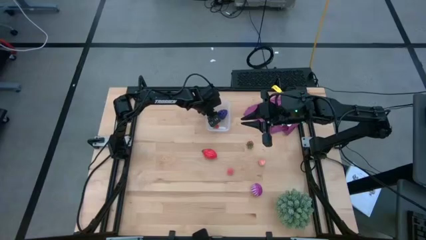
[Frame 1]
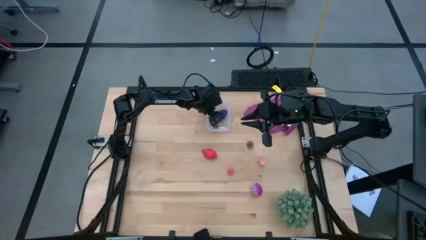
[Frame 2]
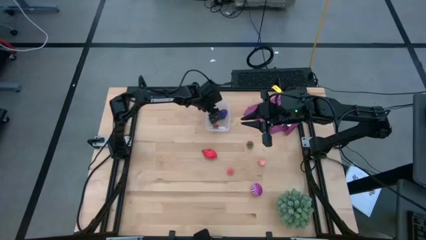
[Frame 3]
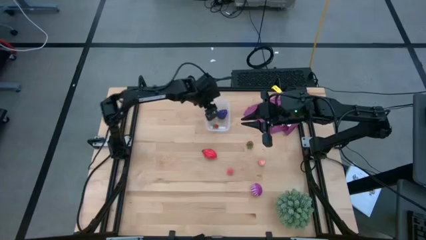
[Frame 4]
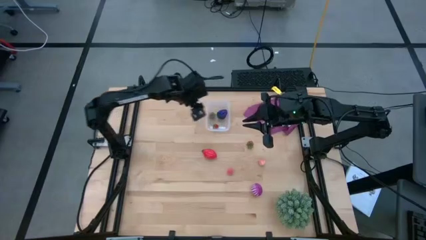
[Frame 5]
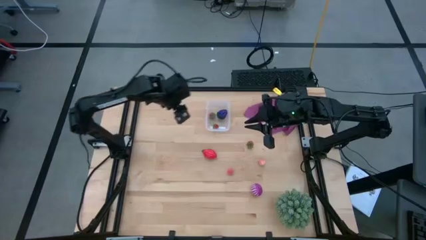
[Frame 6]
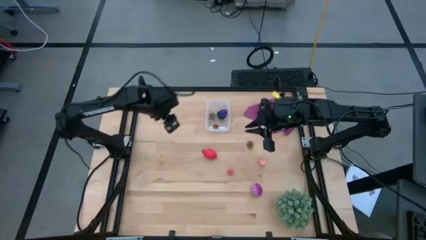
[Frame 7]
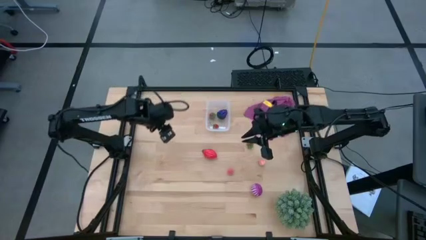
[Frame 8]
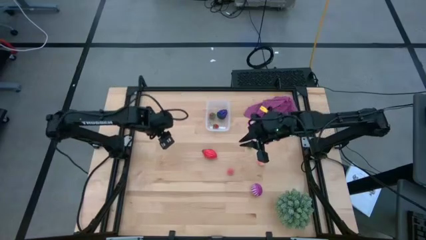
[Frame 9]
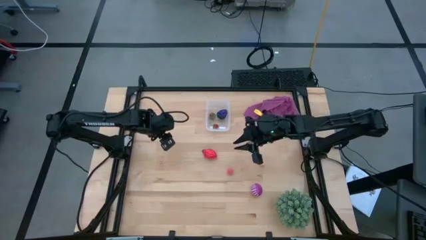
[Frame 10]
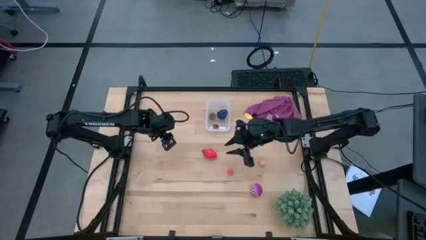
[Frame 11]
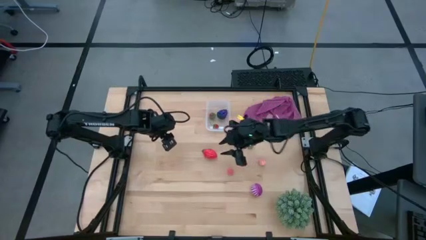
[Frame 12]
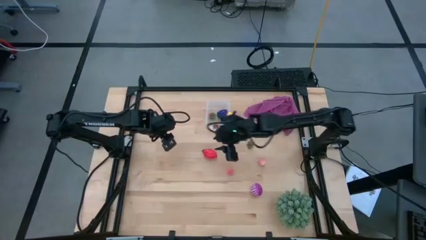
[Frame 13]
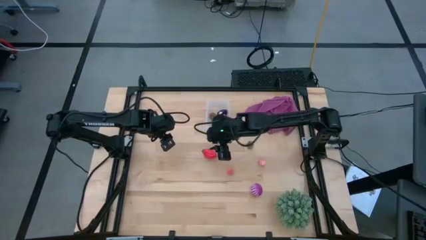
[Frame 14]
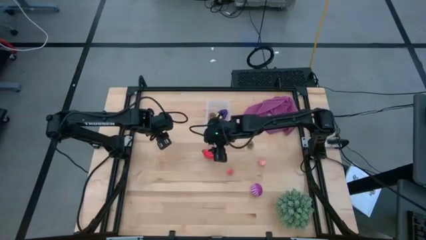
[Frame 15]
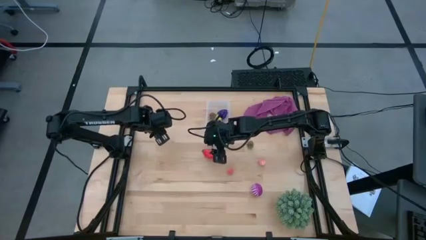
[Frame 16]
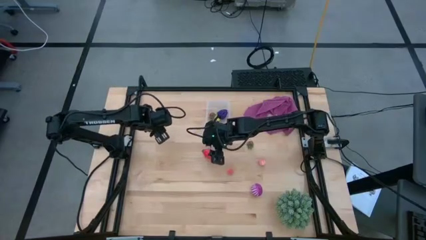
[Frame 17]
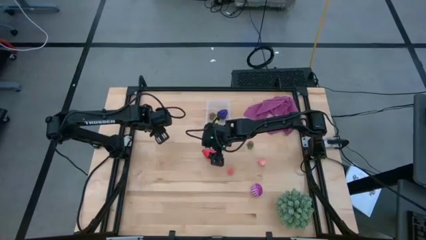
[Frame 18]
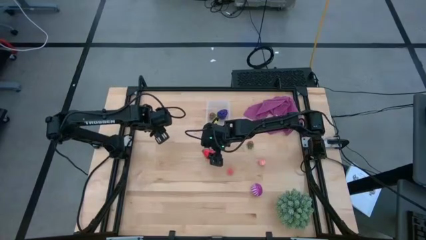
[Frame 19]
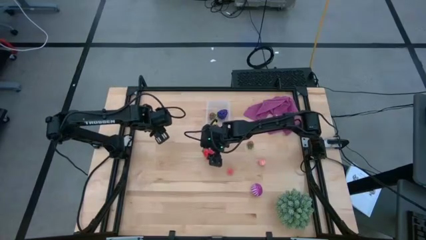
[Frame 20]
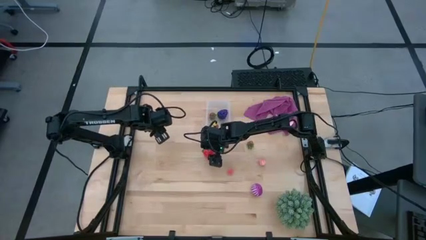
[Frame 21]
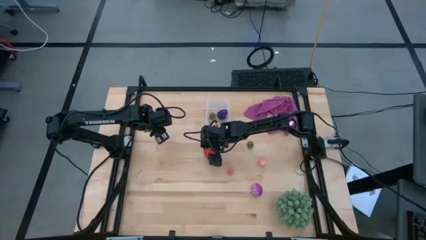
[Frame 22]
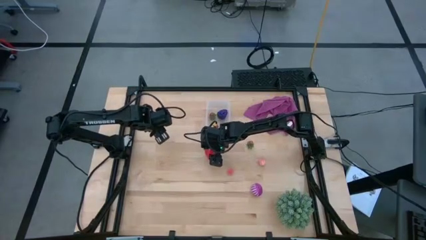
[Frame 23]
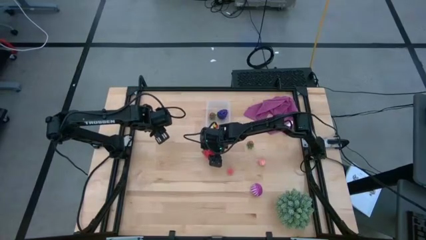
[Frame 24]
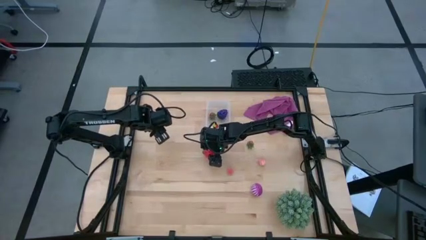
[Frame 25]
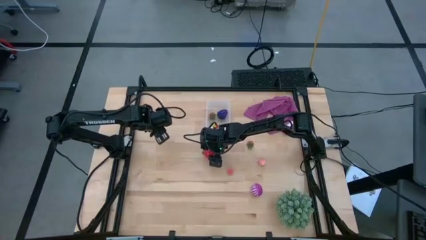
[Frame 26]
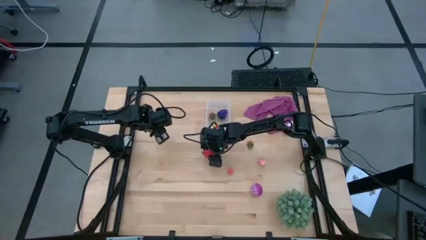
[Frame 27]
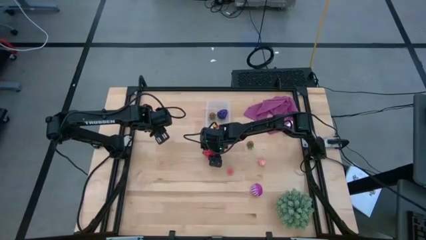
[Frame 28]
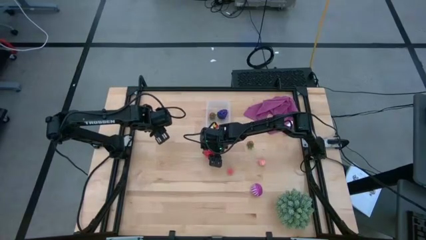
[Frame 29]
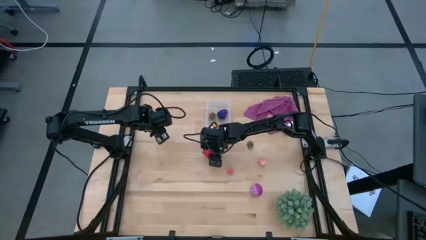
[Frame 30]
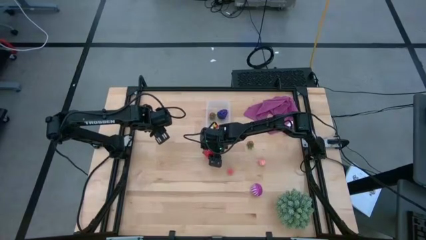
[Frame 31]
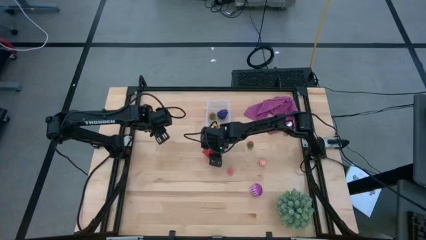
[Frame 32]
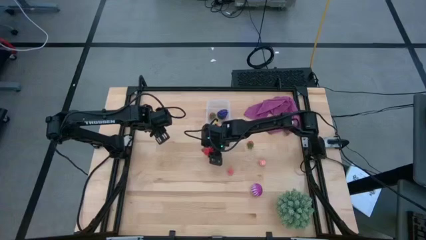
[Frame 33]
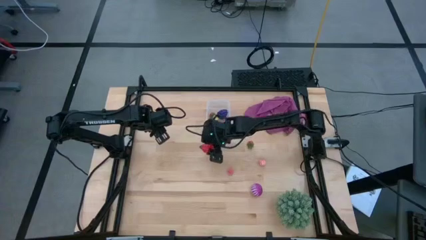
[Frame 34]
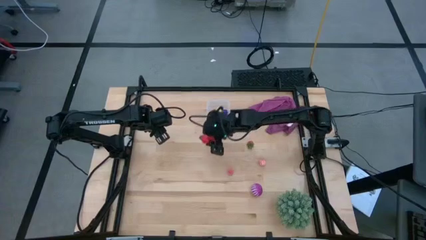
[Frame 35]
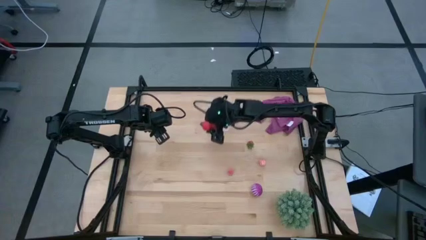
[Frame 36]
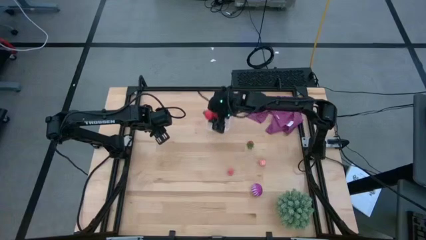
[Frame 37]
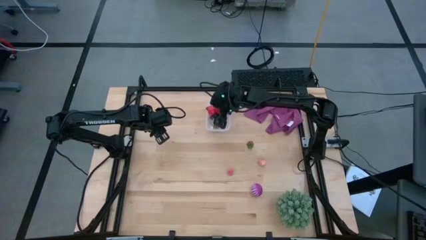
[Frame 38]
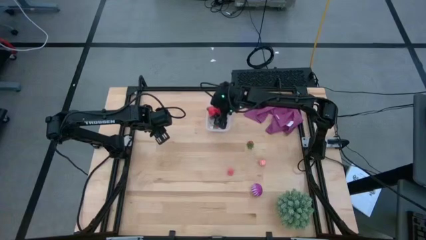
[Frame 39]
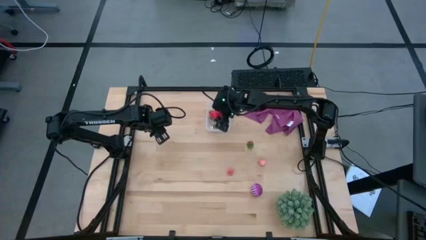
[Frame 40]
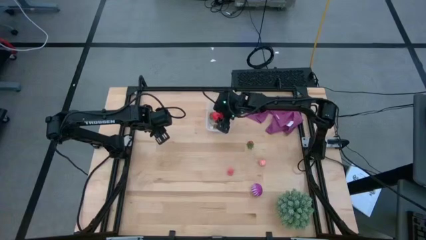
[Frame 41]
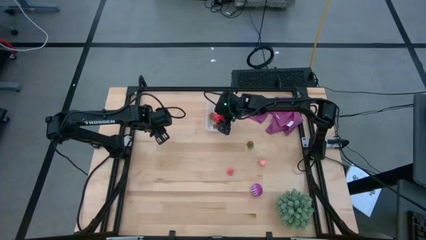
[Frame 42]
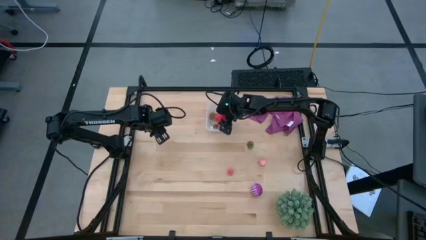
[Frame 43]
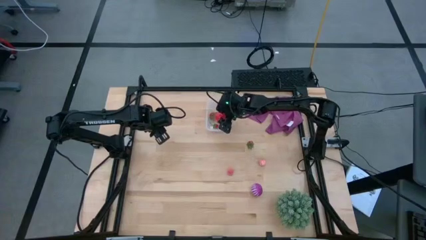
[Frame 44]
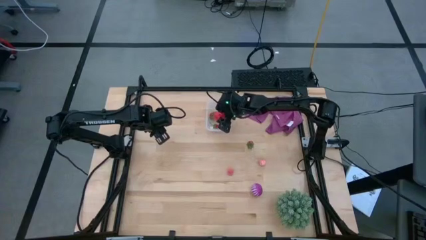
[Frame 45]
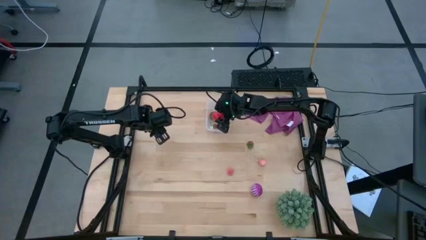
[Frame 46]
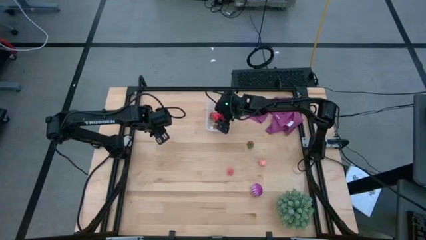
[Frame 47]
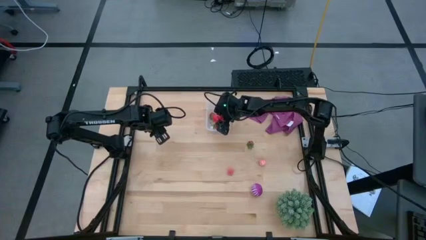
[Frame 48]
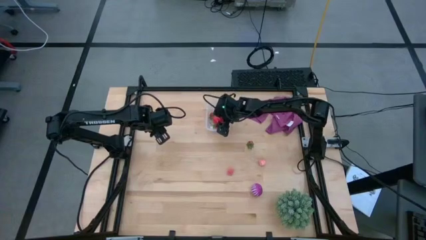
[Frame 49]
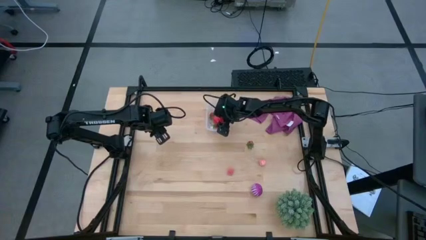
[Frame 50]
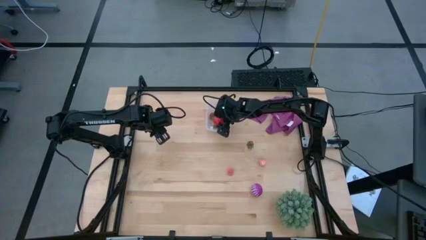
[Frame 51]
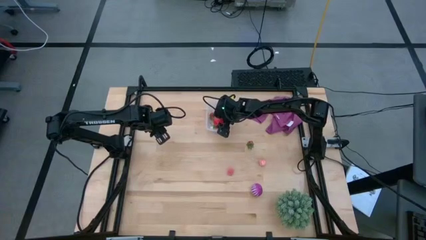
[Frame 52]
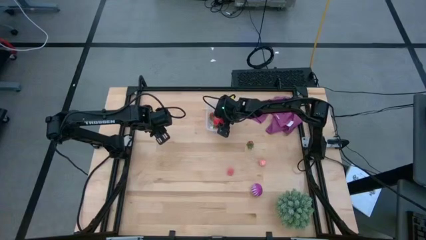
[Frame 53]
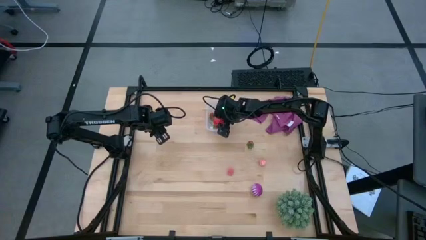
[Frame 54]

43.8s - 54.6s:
Task: Pick and placing Produce into tupperware
Put the red dragon fruit into the transparent bin

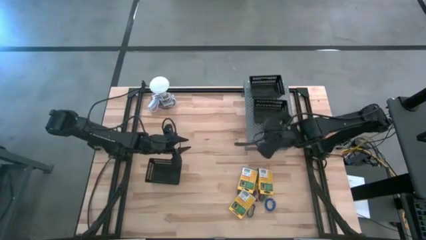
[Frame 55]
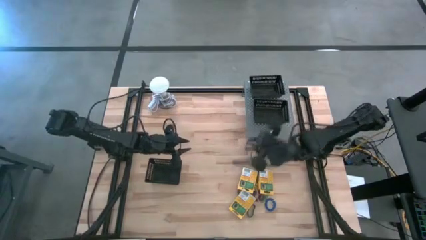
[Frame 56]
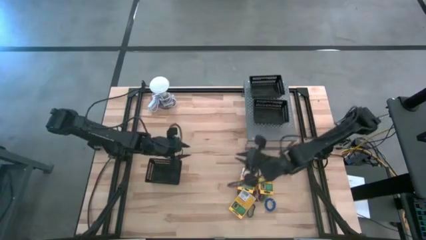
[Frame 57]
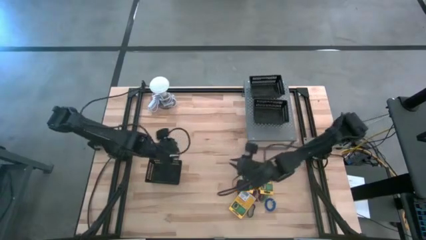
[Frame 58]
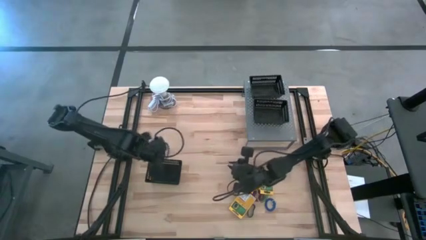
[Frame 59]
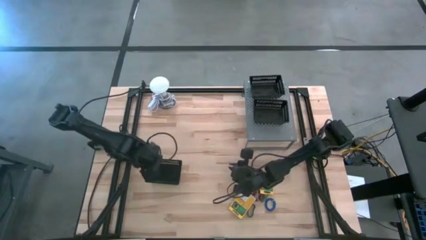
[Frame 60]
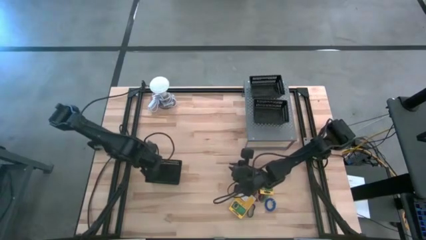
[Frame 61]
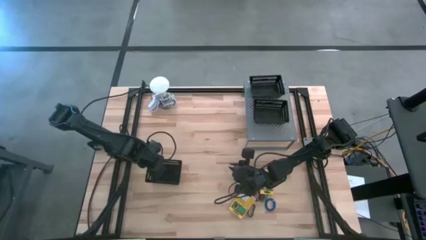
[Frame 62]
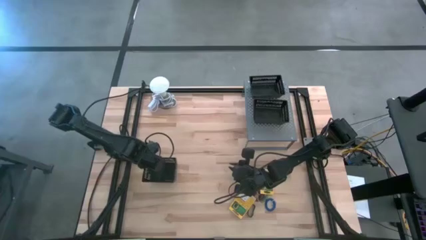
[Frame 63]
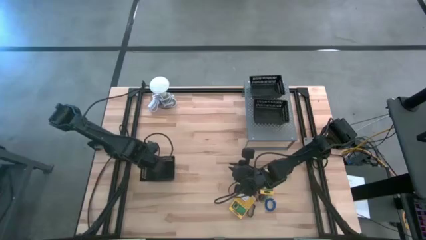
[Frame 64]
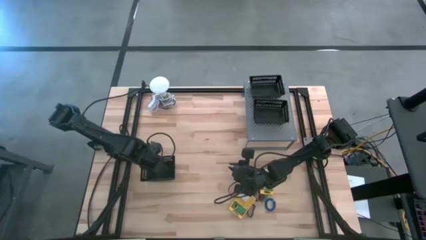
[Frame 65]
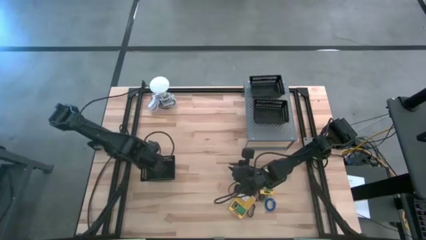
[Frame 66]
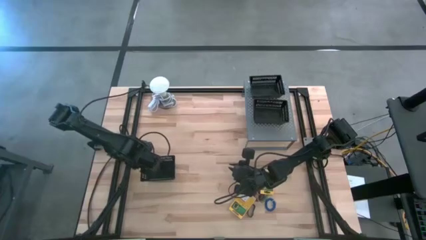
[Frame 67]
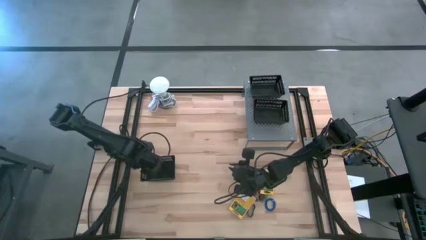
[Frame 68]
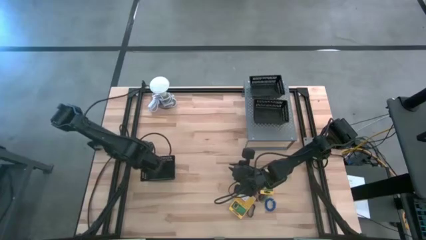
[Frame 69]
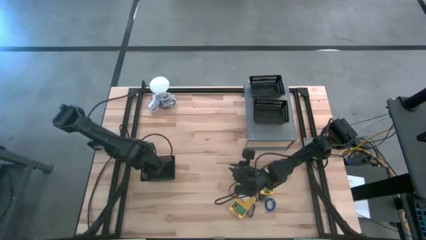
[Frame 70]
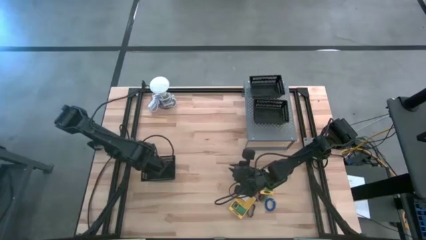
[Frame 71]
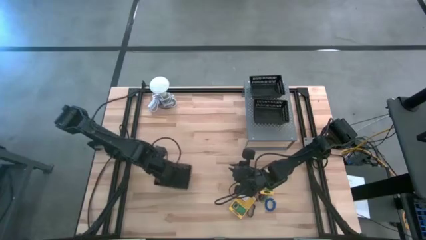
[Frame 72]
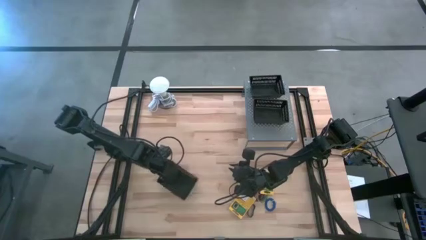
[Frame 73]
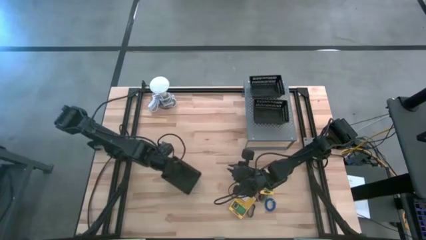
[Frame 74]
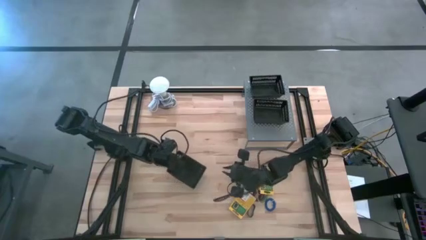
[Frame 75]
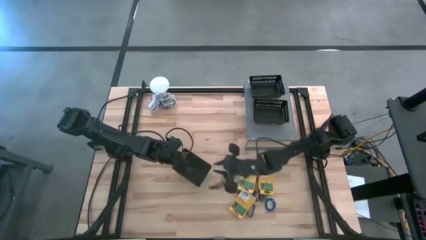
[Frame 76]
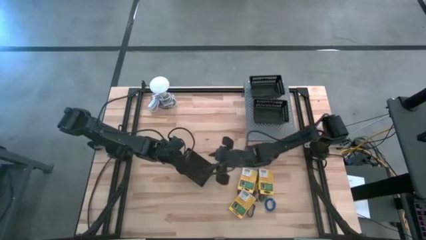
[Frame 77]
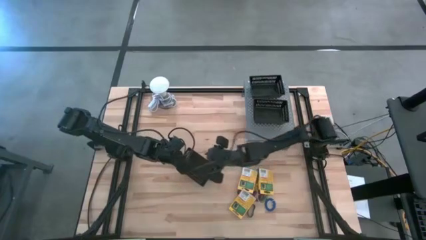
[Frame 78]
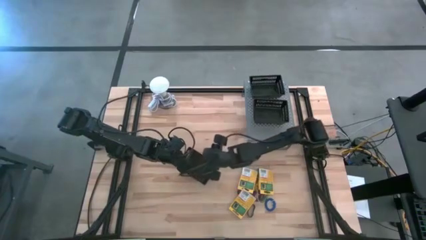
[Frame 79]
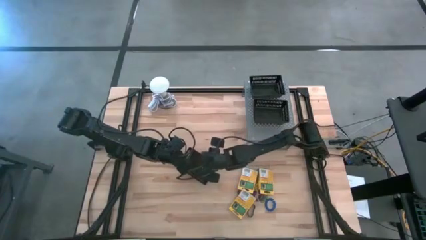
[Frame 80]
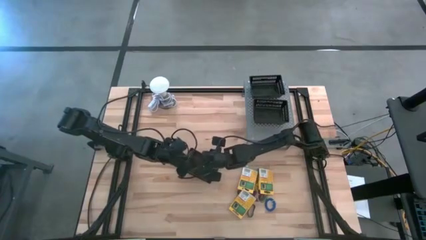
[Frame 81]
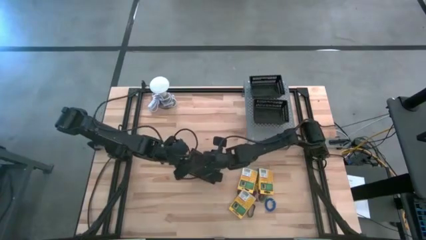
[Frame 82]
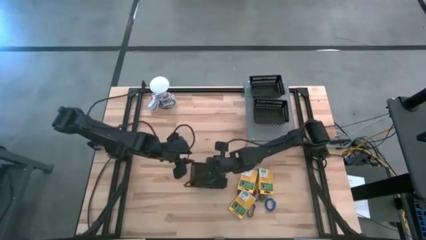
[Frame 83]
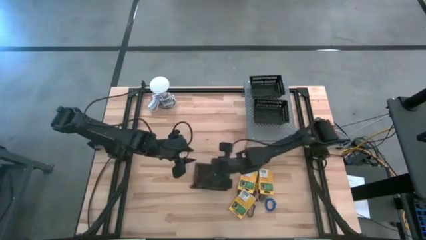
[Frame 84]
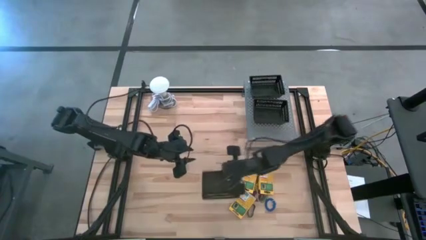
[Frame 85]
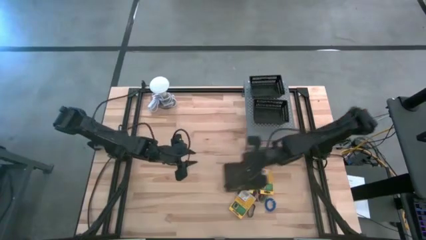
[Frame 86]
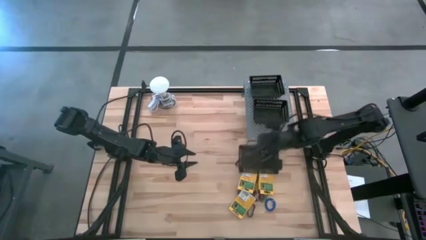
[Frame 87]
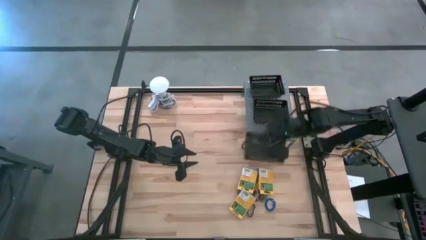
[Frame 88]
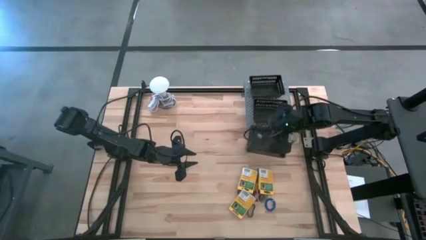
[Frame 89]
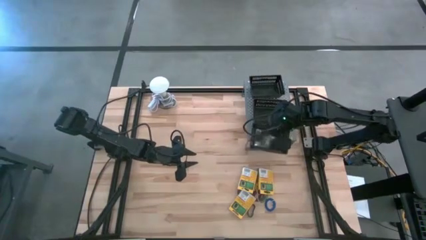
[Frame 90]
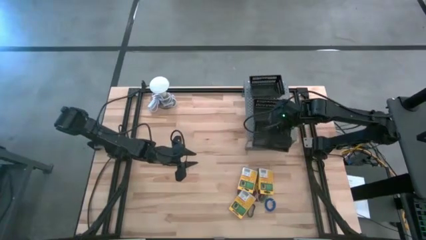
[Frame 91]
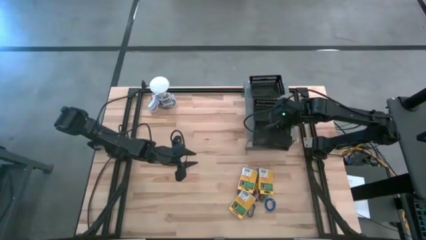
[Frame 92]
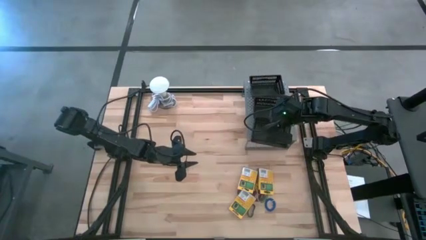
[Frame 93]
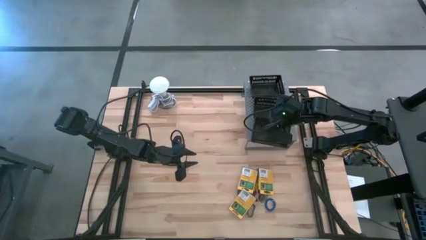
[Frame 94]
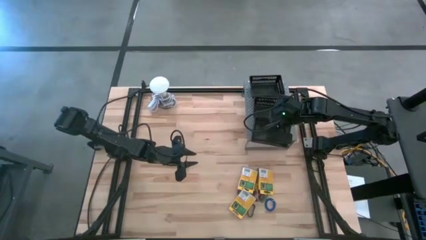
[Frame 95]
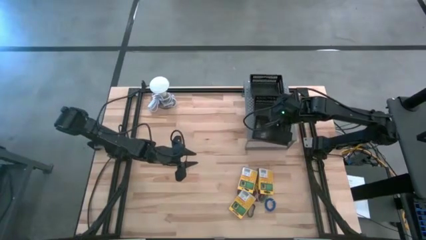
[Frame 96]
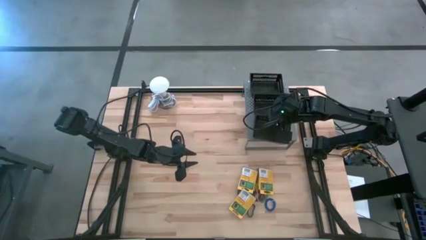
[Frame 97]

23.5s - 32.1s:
Task: Pick & Place Office Desk Supplies
Put the black bin on the shelf
